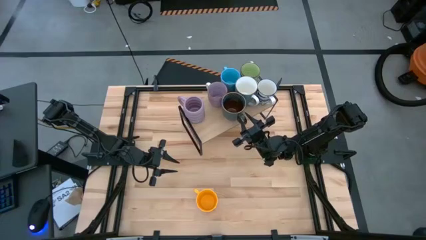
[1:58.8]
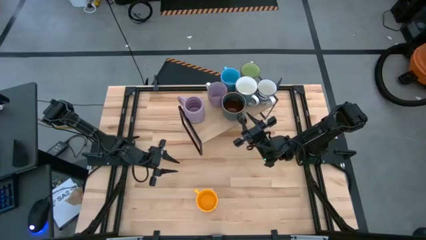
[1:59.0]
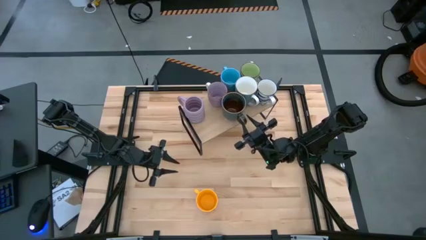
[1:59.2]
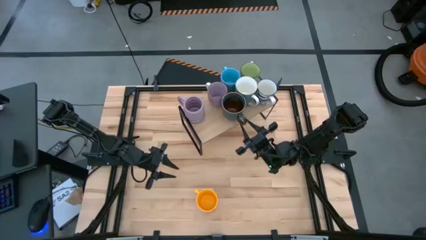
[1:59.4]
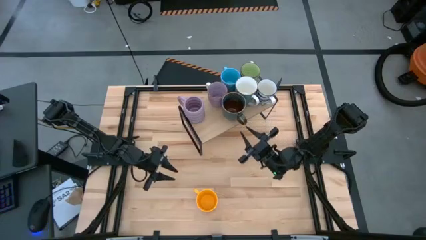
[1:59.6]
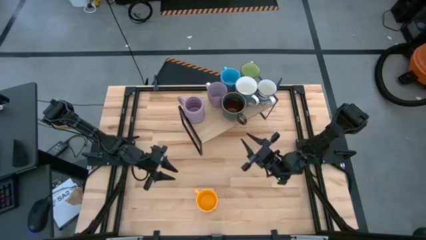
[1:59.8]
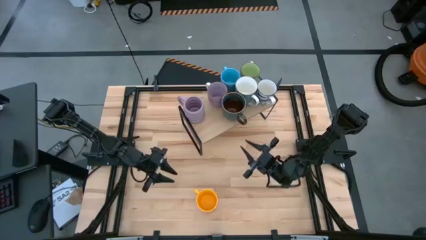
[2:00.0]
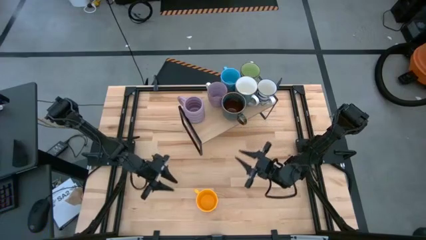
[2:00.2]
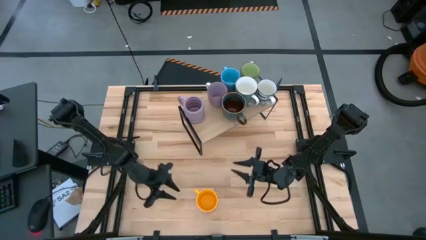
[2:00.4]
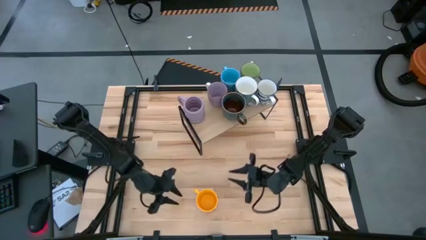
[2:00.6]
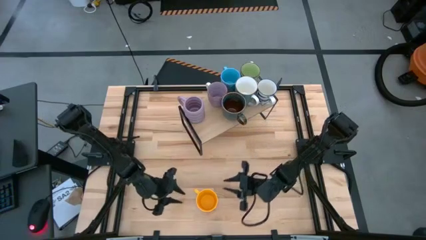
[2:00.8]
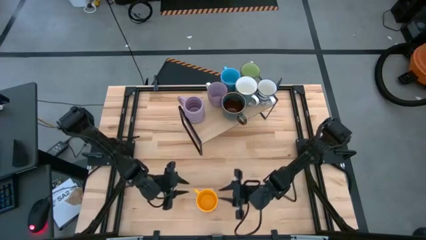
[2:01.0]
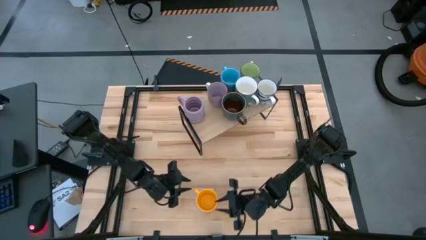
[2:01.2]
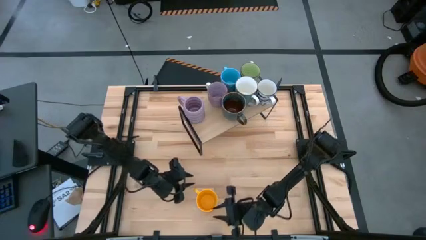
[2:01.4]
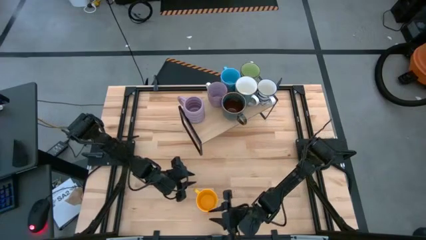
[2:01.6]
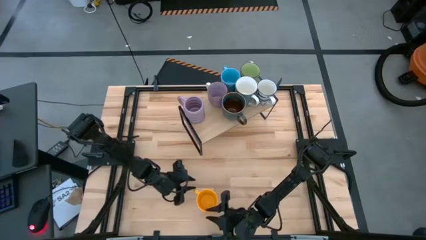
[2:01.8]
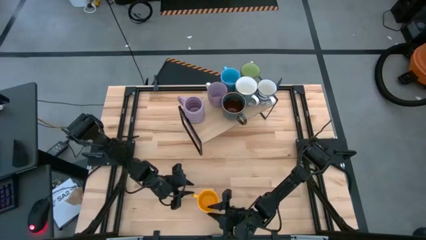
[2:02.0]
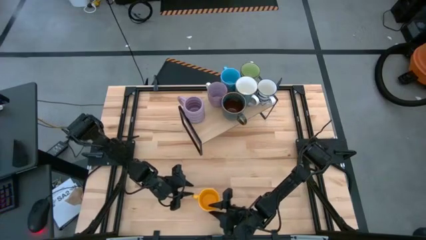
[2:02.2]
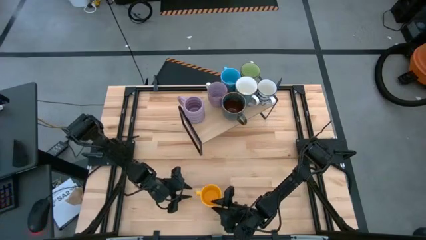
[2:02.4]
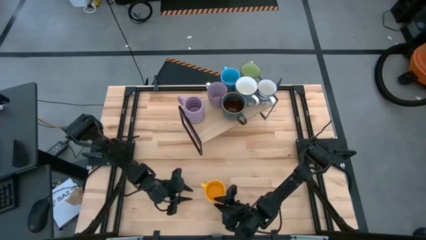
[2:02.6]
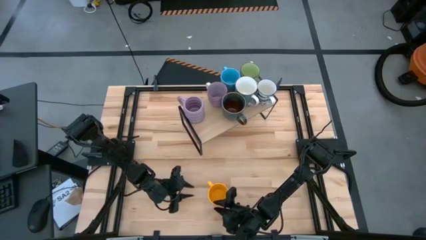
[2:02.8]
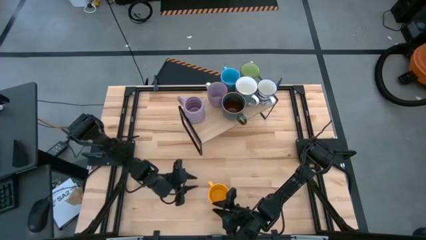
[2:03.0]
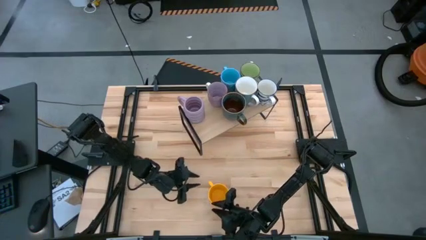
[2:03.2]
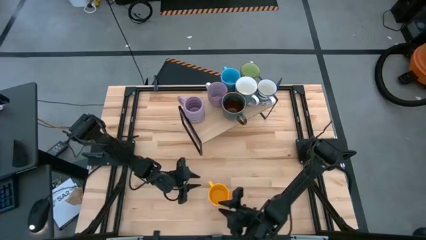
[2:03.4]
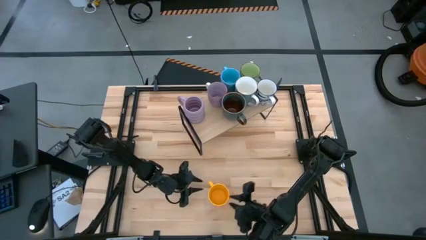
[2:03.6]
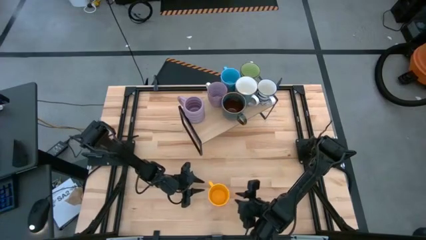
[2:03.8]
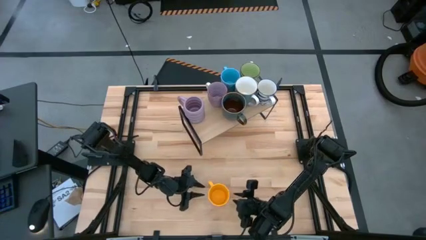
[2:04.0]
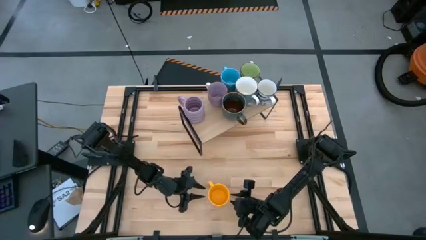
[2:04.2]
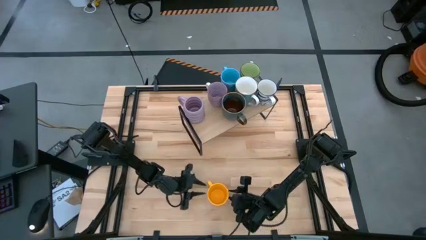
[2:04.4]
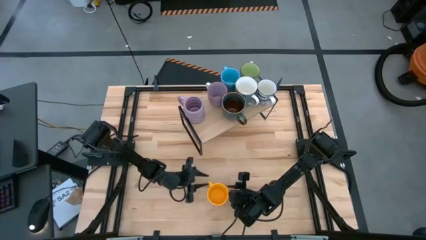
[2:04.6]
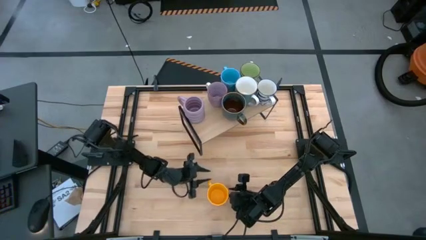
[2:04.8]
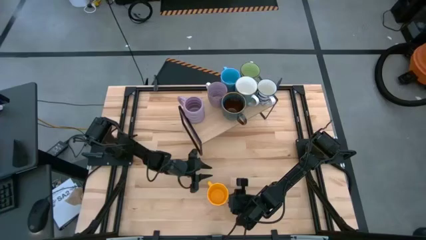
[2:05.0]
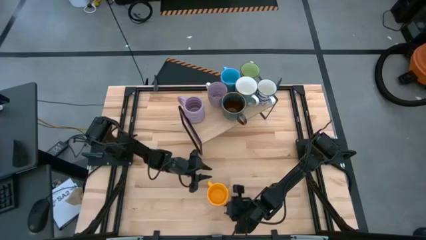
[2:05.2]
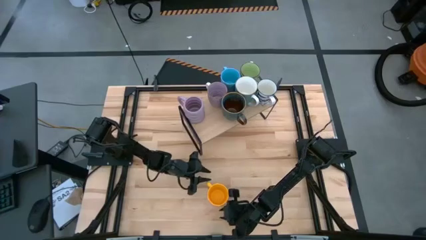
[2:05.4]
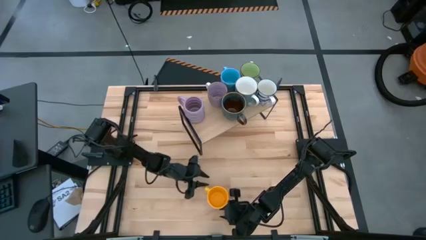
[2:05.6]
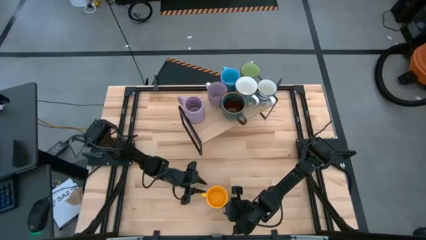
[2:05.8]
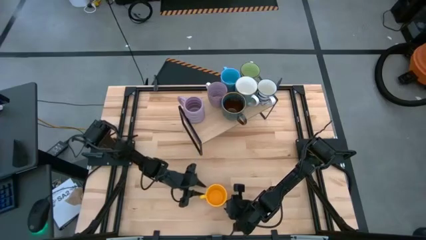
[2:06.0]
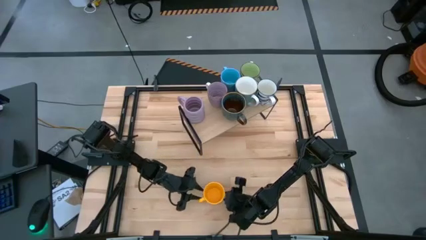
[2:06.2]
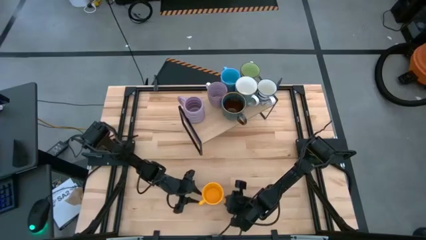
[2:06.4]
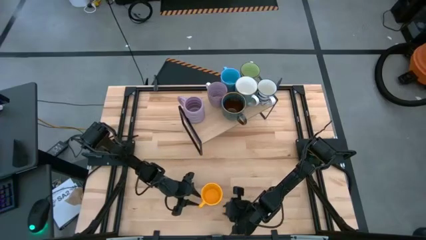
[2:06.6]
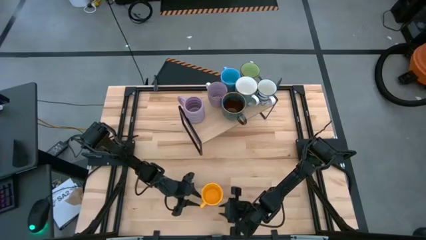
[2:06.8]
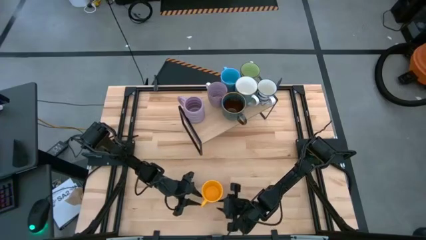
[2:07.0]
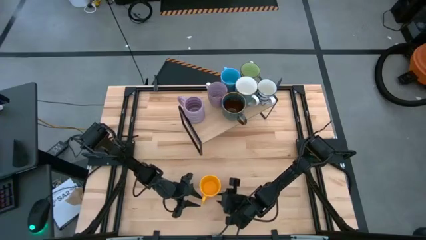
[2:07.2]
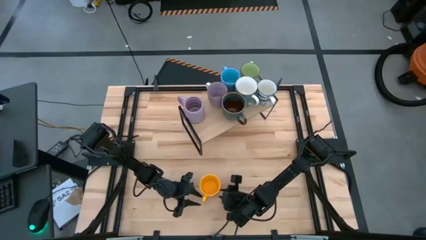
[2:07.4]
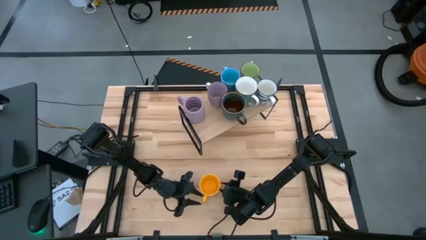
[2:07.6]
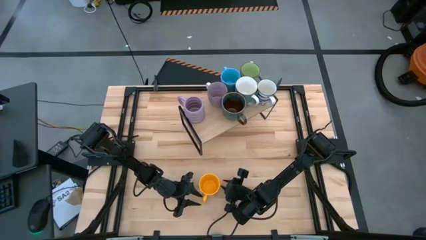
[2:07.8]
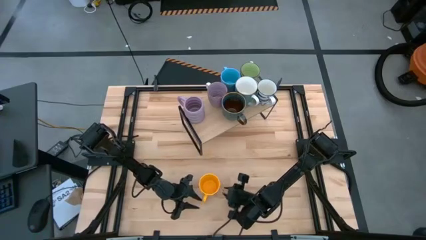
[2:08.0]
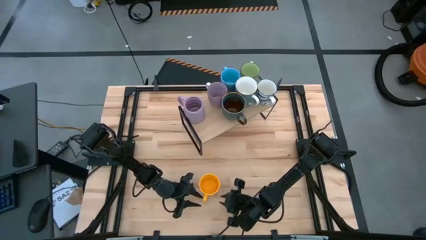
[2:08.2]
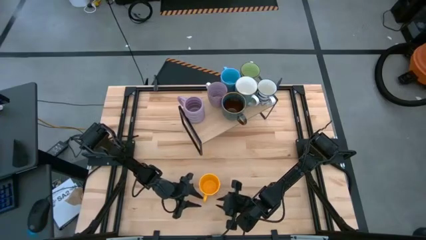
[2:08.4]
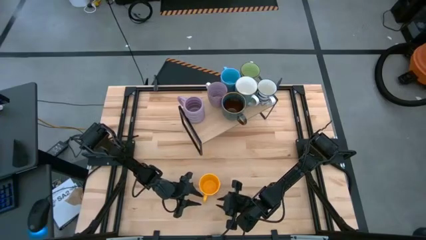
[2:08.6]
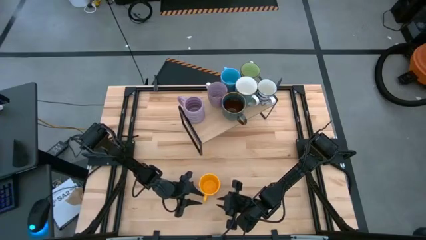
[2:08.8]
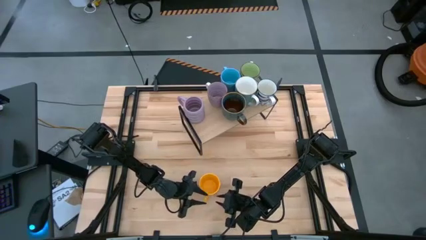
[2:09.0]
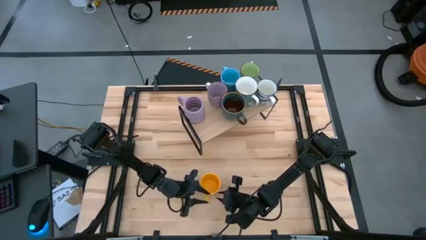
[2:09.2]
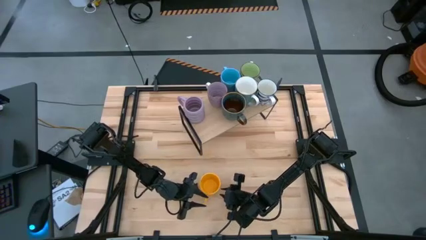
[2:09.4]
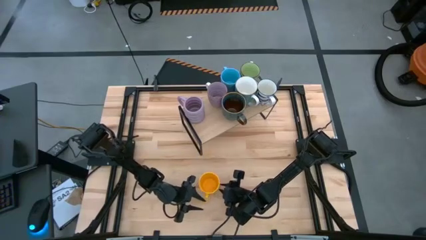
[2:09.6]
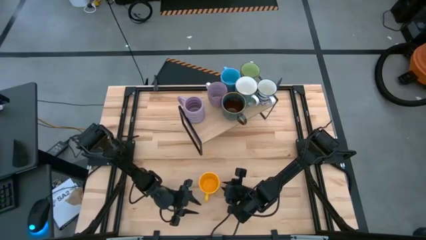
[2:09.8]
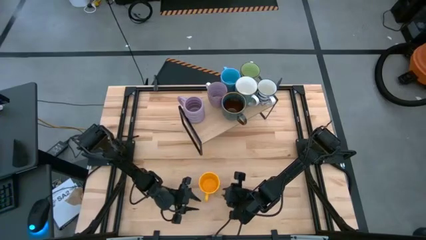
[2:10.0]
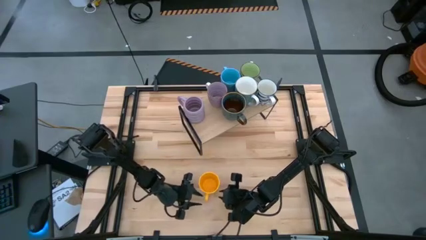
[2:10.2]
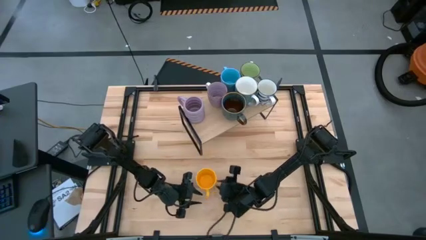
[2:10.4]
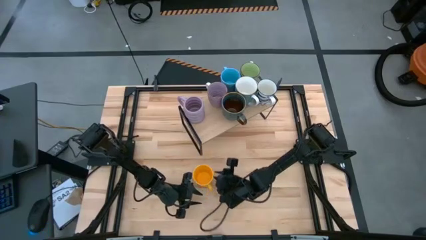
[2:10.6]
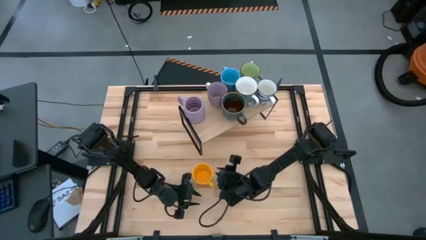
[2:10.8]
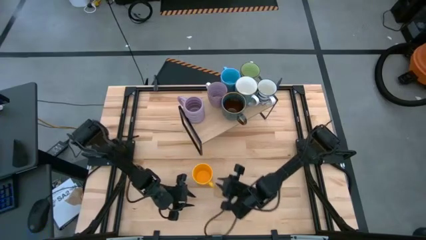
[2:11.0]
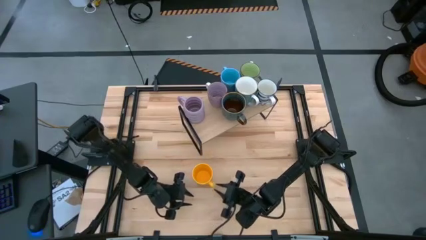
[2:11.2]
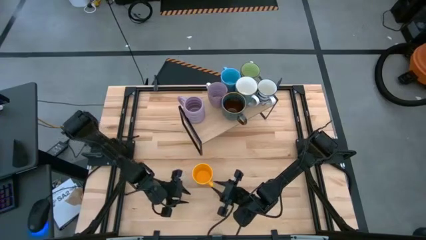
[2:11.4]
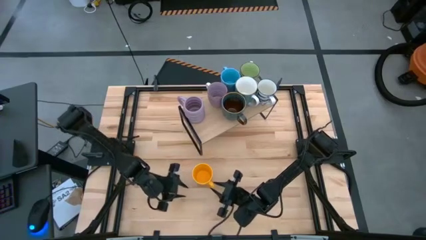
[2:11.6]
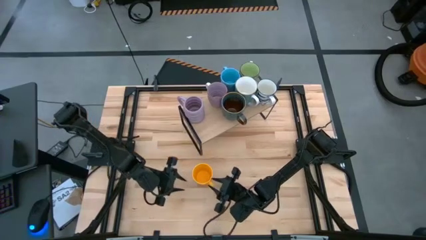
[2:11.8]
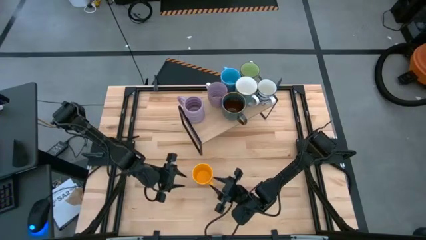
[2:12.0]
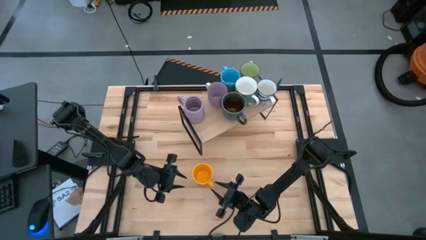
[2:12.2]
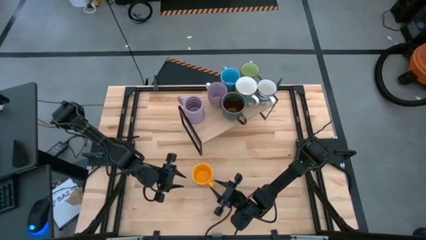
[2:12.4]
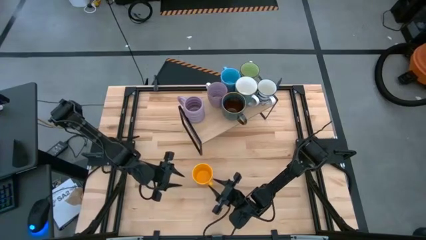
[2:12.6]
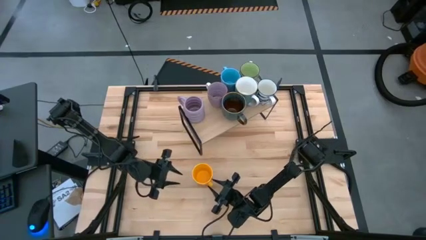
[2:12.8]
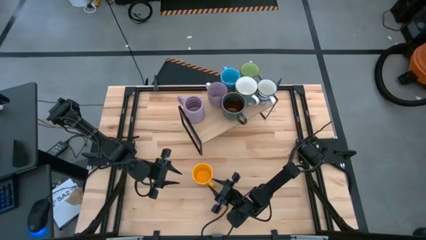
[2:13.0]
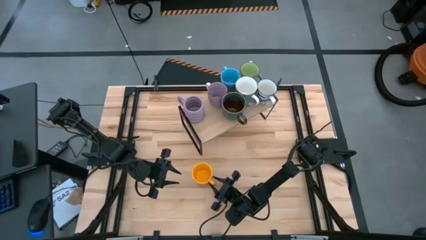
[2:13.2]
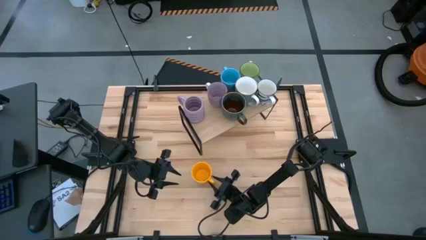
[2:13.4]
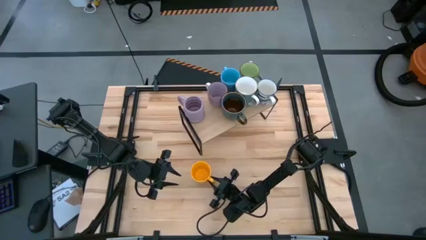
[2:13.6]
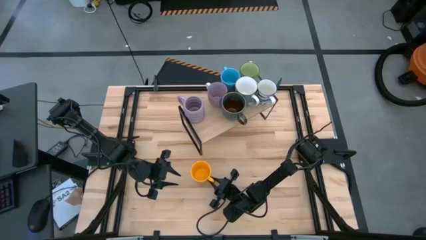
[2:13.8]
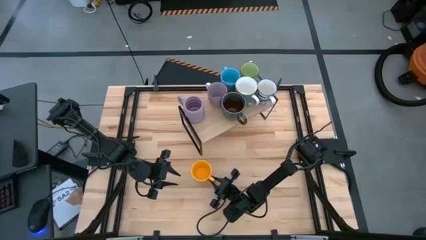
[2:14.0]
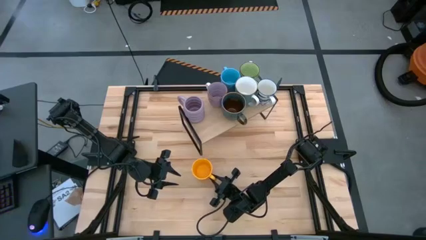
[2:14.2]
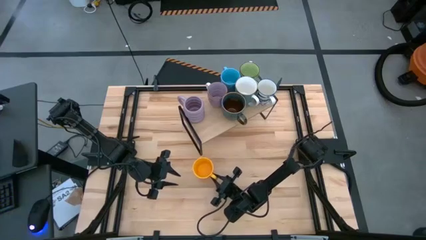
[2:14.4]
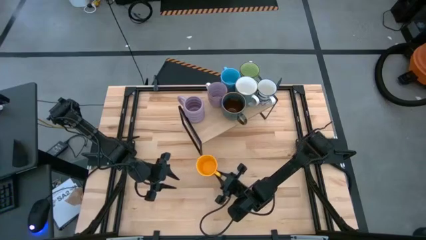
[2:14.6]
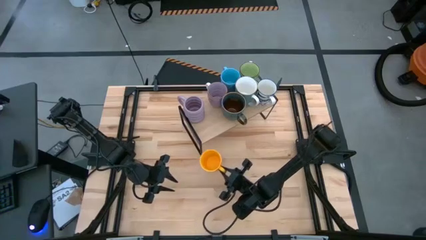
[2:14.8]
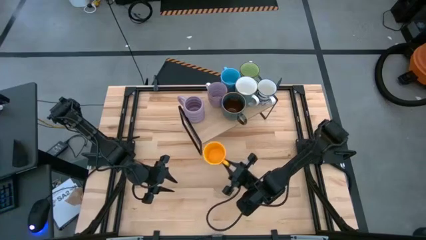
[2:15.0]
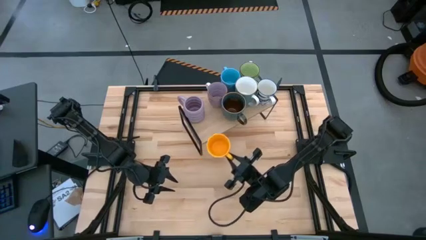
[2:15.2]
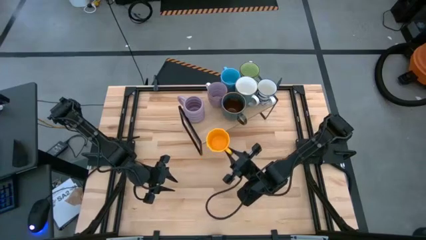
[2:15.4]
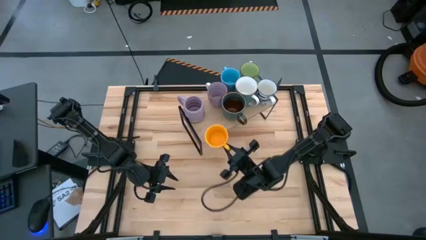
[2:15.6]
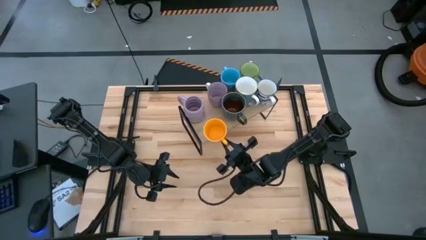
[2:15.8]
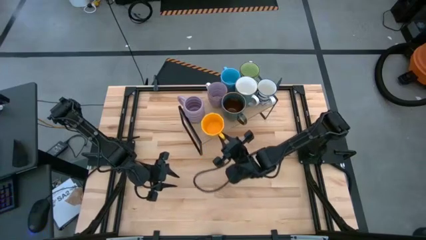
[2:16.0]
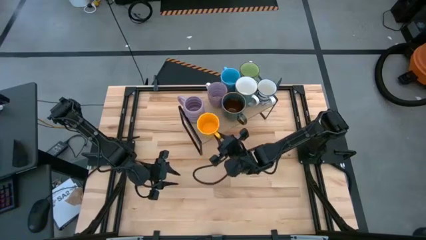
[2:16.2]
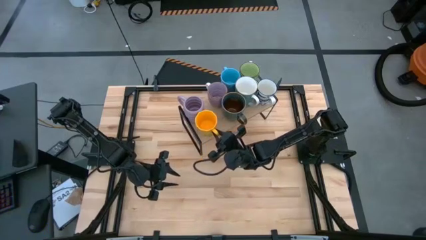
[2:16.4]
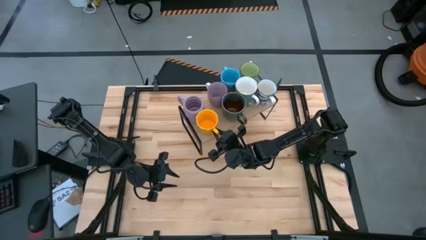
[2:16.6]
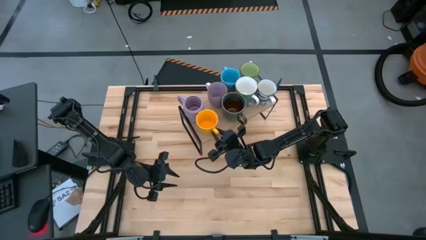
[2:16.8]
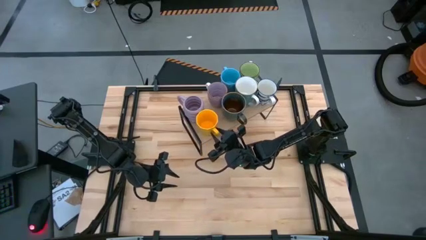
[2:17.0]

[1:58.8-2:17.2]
Task: Place coffee mugs
Put the yellow mug on the shelf
